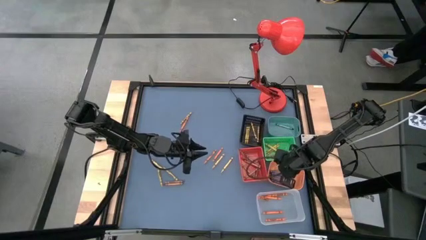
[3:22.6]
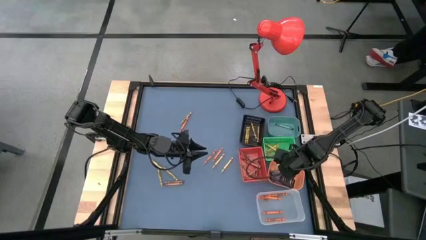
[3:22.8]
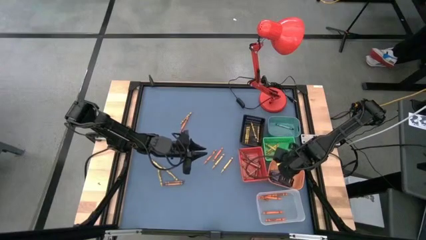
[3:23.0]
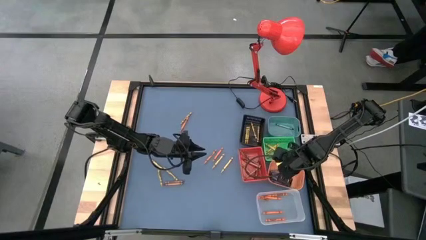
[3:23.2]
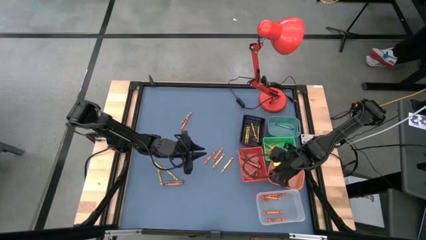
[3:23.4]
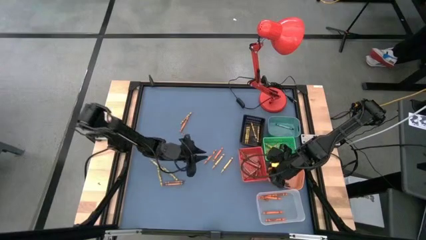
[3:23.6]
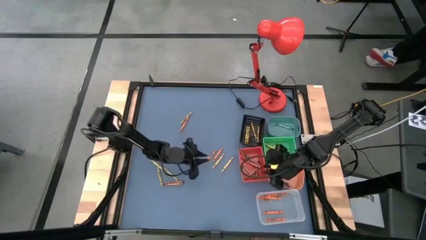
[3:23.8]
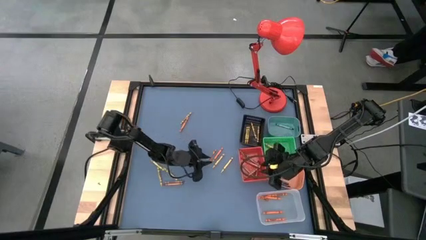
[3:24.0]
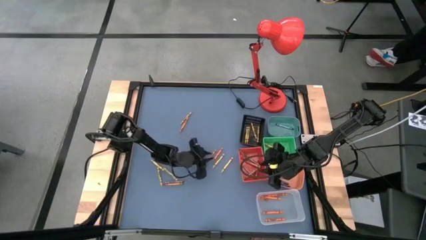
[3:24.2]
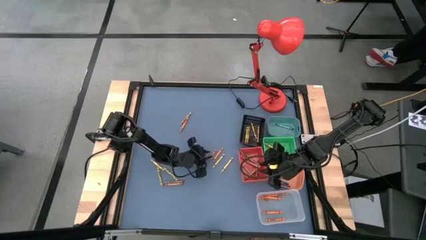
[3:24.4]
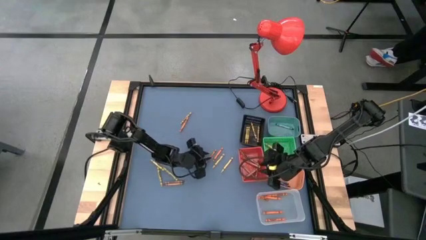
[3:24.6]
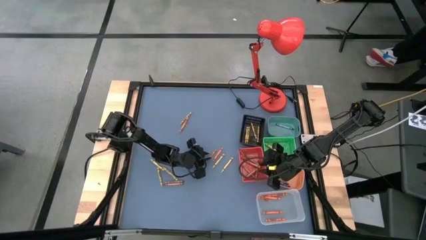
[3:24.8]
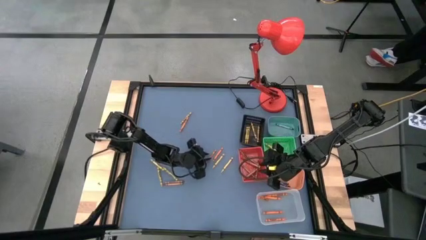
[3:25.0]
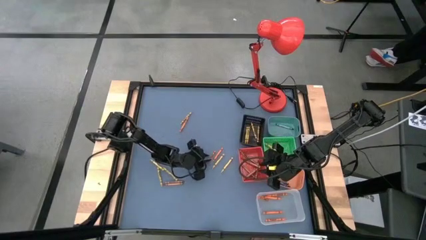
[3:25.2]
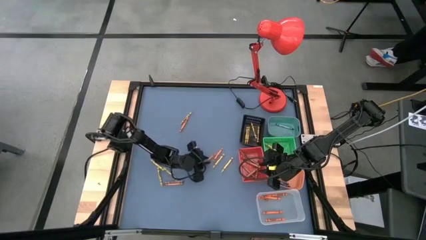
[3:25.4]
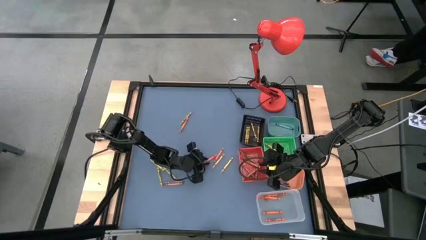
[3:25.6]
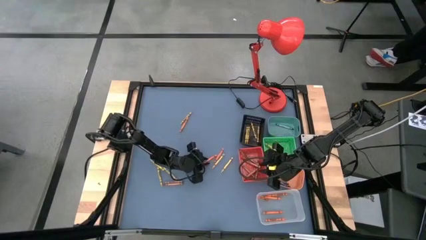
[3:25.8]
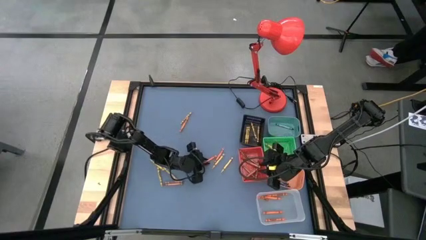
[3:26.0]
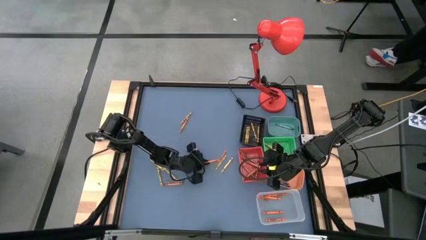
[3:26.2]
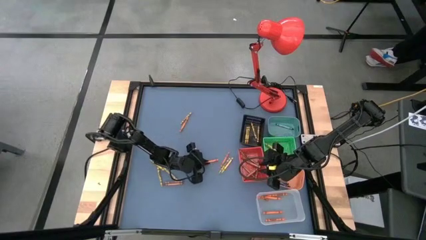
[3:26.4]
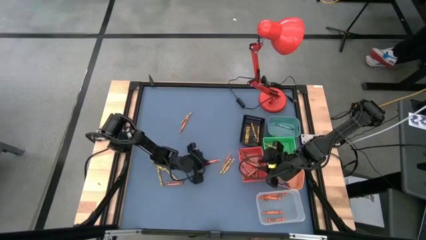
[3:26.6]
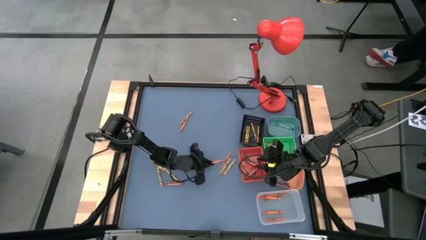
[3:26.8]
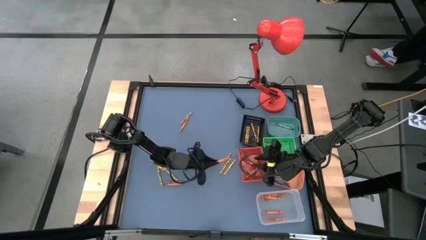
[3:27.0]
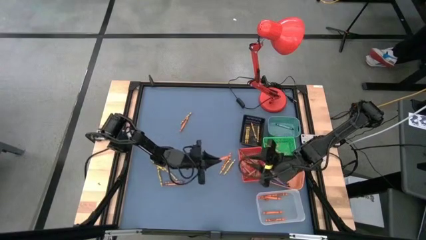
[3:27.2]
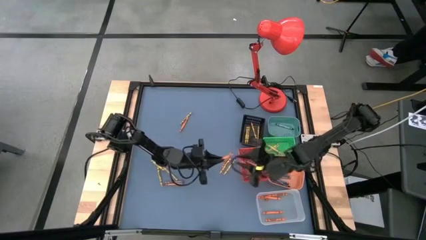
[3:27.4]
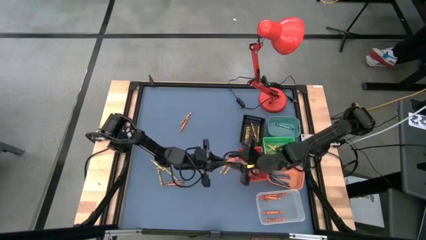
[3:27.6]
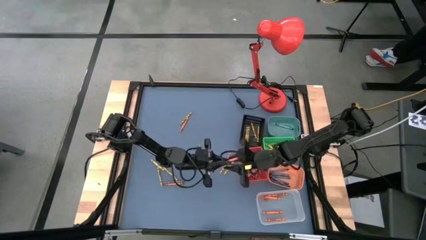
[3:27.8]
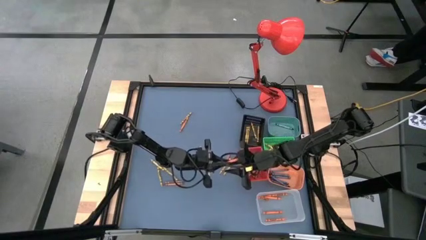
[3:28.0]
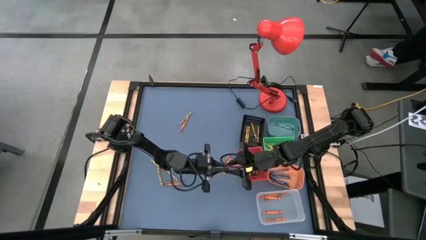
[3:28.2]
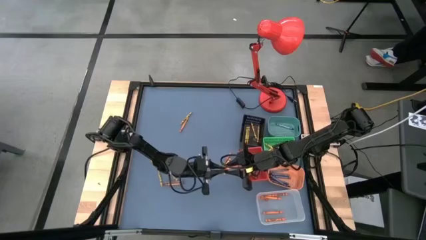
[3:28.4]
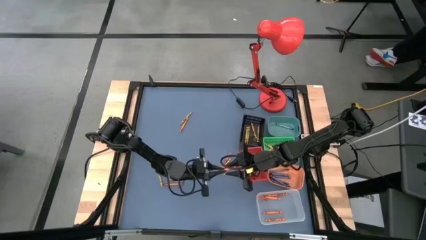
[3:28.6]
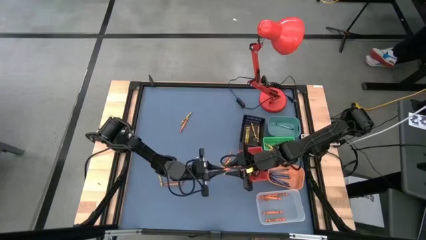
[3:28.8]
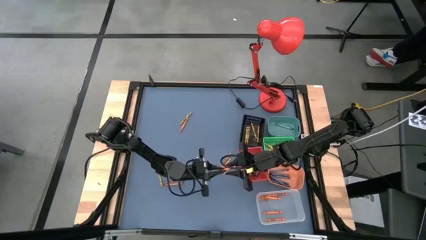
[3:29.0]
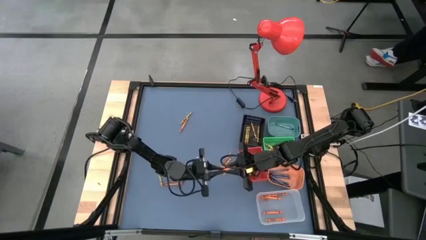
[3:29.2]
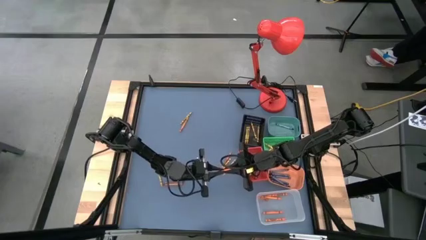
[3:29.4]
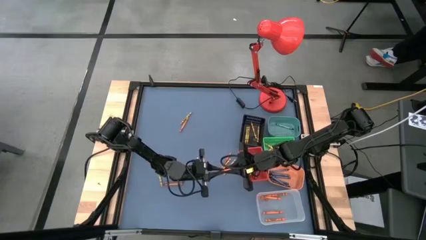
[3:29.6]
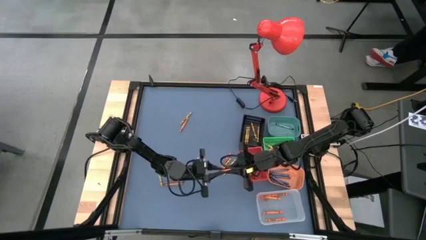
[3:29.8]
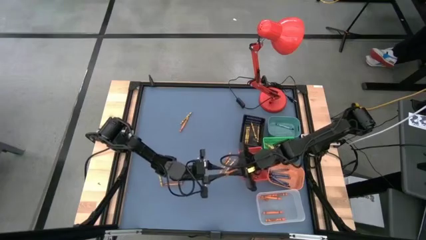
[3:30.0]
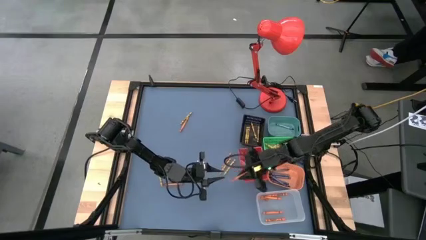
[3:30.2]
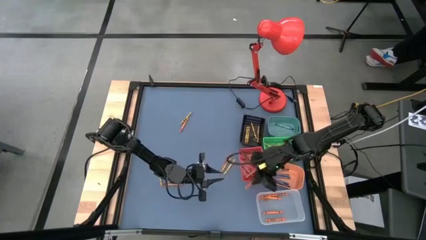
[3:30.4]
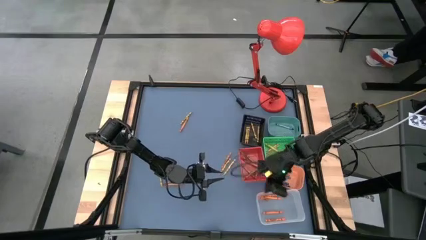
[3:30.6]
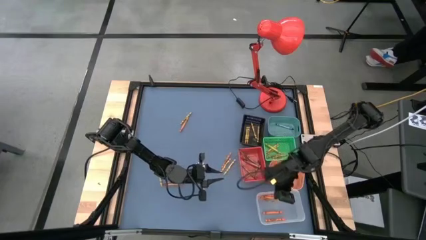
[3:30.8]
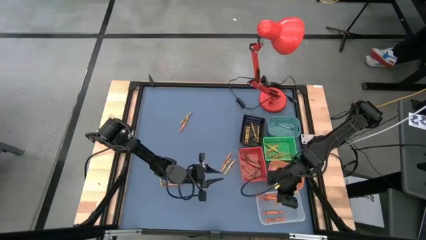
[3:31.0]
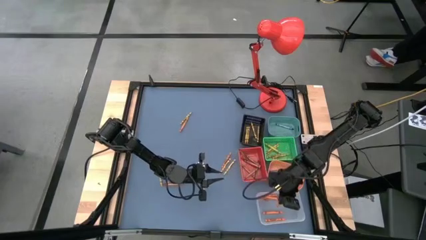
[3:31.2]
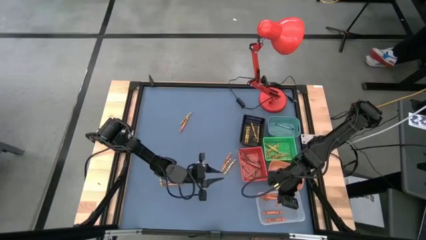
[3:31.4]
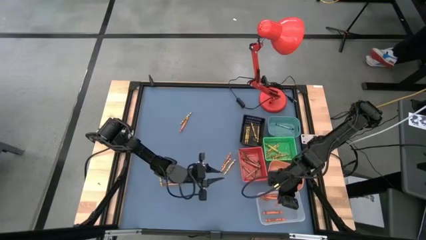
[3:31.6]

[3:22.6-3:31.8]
Task: Sort crayons
Put the orange crayon into the transparent bin

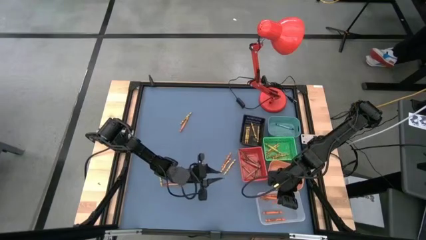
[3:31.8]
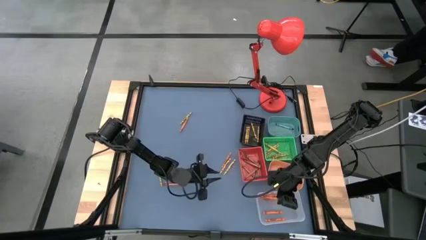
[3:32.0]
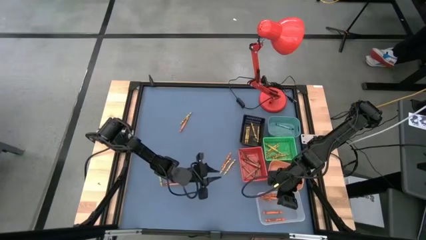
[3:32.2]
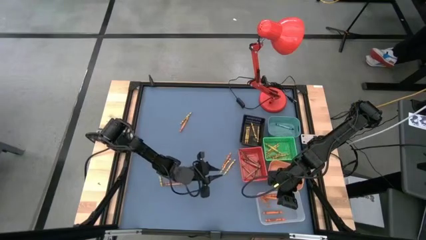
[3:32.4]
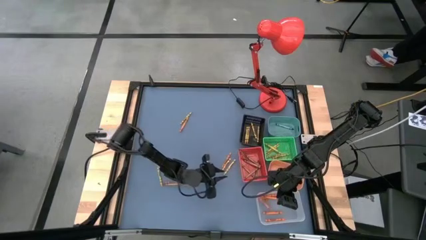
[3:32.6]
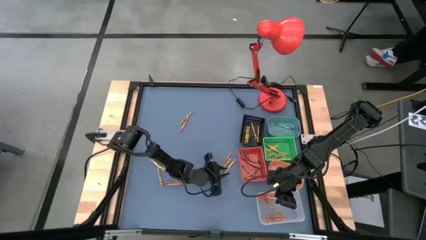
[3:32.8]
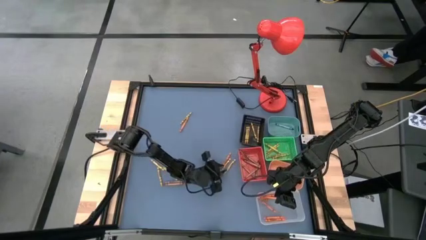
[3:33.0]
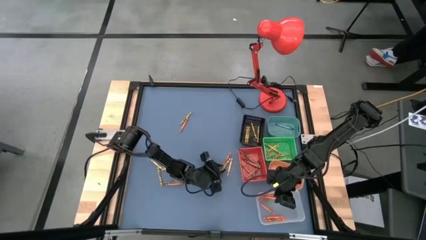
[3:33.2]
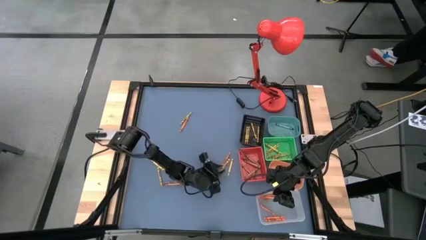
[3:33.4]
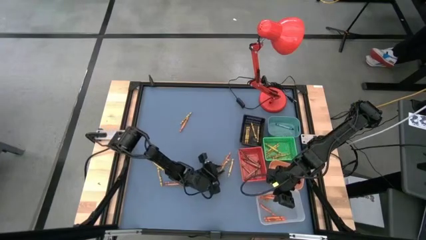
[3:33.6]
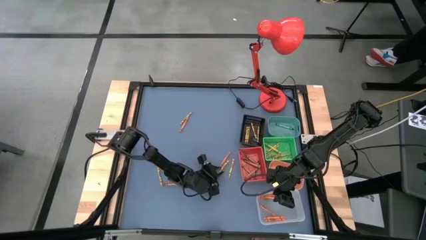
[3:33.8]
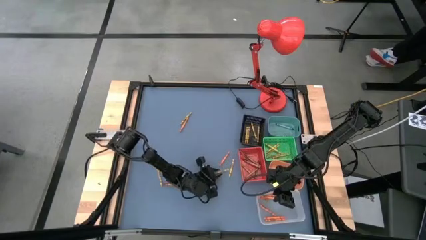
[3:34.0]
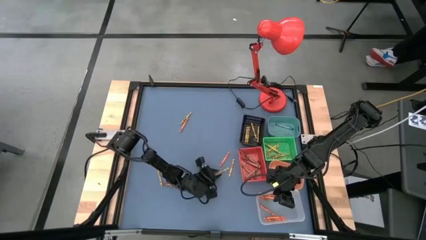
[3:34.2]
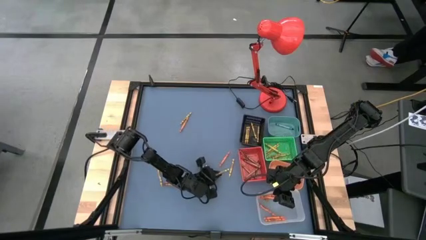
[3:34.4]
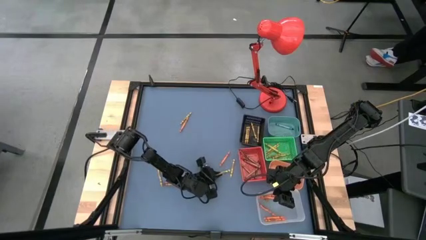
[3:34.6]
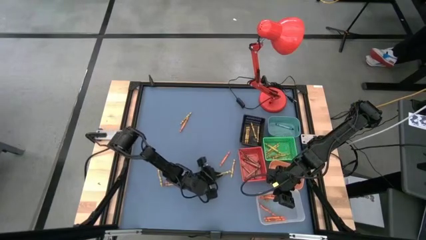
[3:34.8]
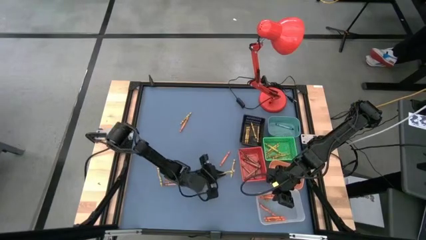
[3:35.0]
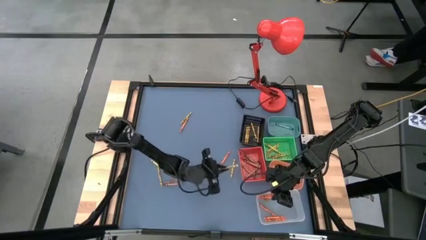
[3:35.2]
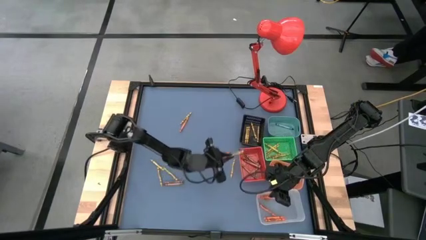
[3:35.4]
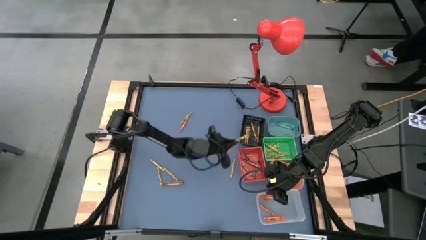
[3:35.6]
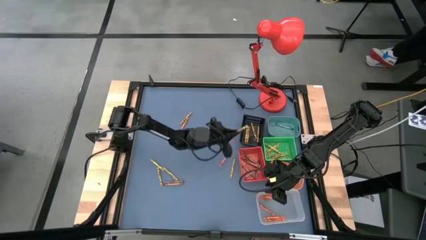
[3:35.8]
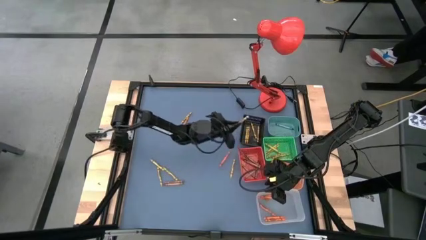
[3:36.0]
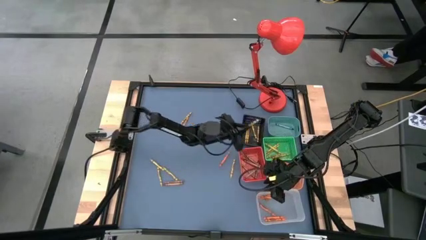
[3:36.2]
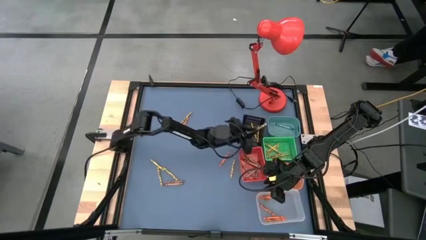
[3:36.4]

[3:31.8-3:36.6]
Put the yellow crayon into the black basket

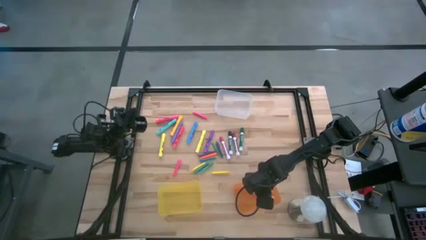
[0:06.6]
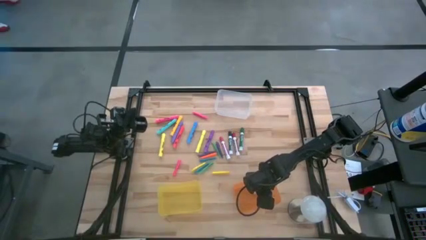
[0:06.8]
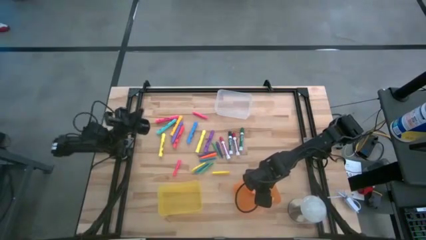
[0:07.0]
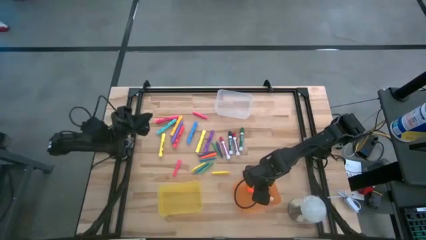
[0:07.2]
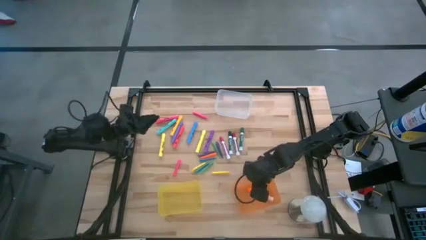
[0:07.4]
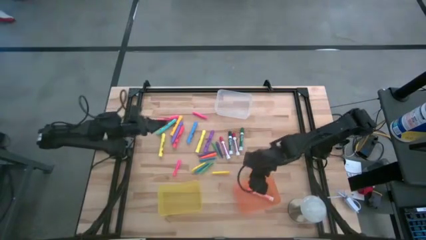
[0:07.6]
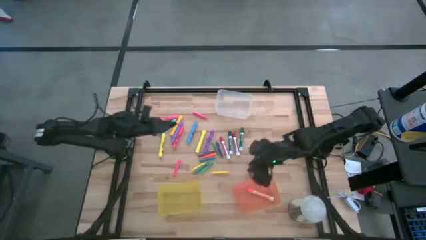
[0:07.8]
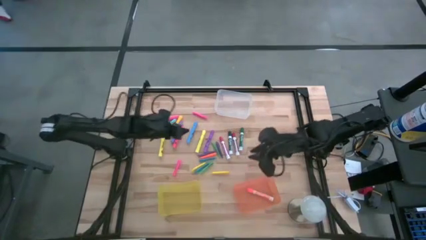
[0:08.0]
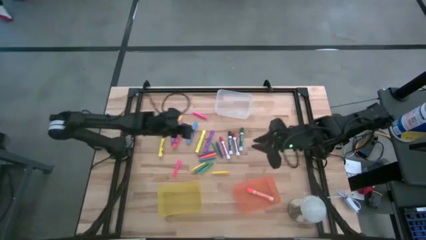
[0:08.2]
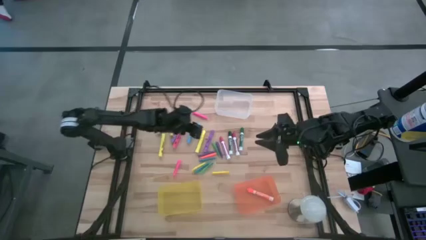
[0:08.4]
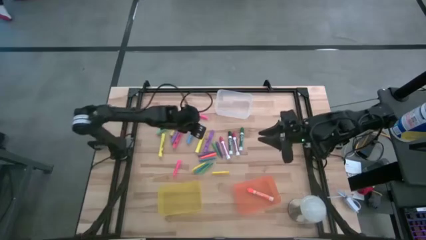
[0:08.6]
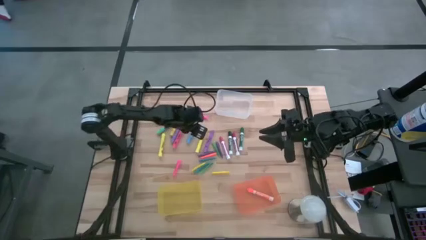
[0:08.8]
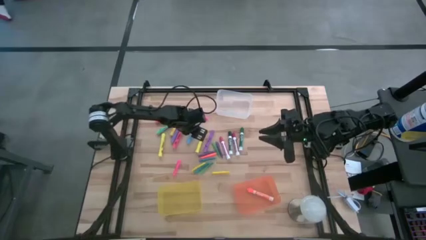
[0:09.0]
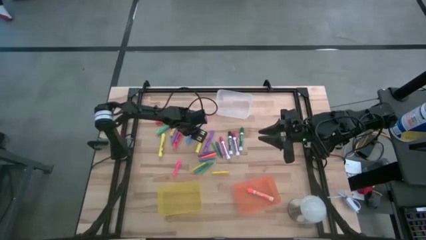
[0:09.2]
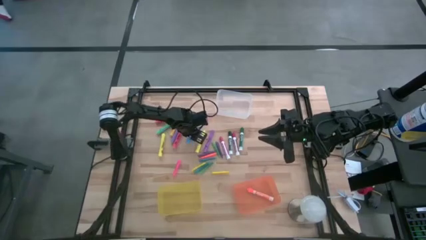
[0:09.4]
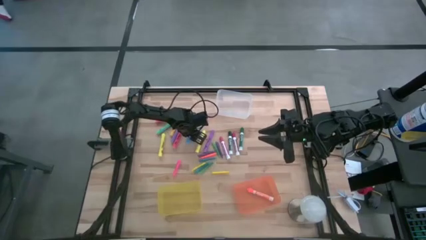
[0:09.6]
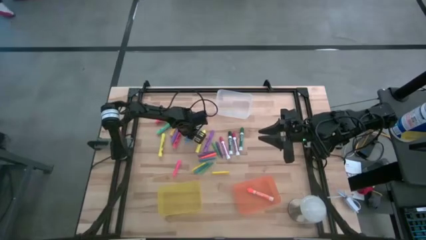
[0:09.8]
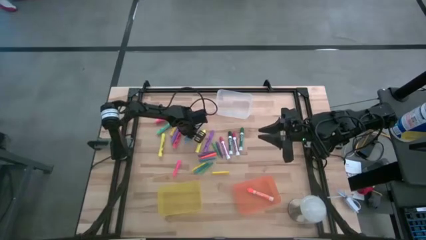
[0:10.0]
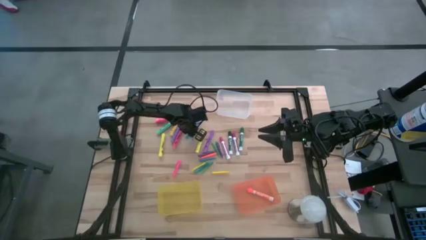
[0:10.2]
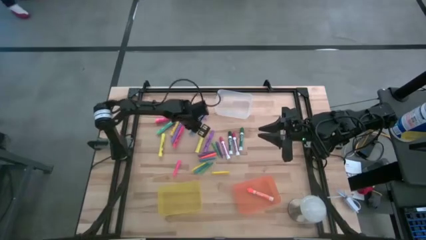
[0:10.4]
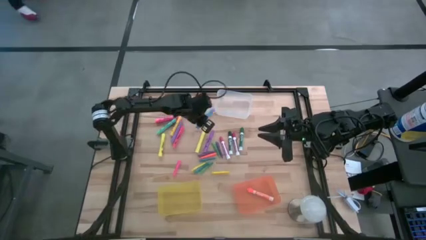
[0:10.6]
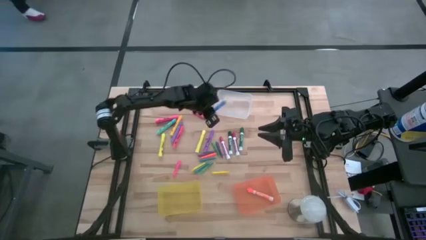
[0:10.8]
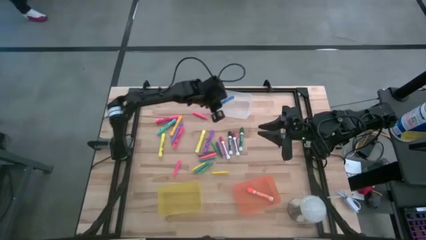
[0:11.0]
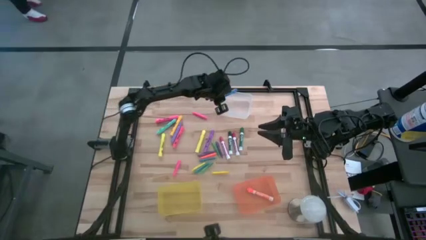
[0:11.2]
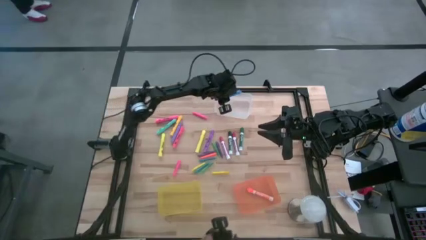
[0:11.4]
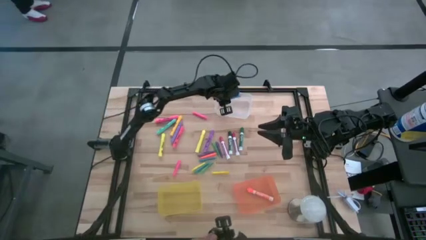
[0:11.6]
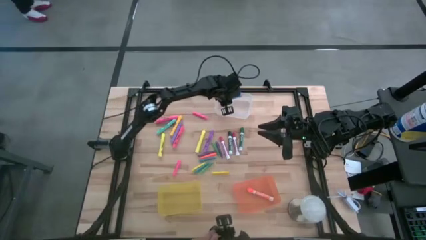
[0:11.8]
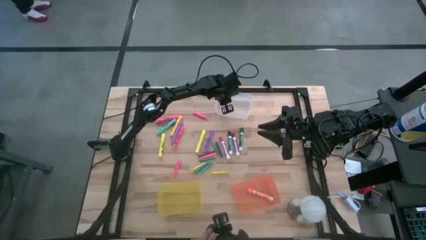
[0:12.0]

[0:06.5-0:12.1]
Task: Pick & Place Markers
Put the blue highlighter pen into the transparent bin
